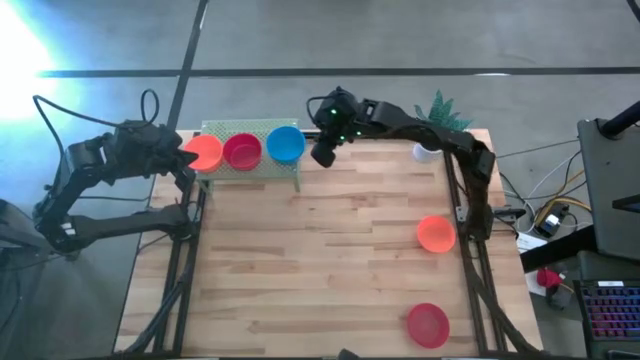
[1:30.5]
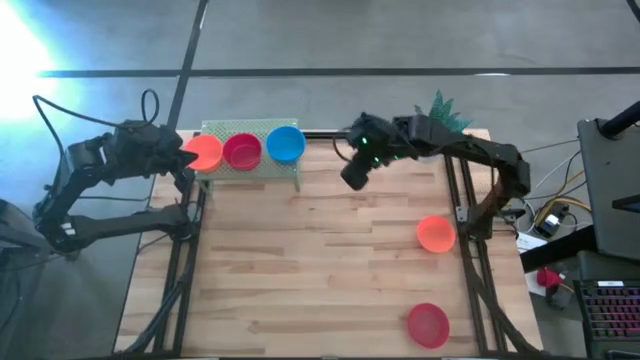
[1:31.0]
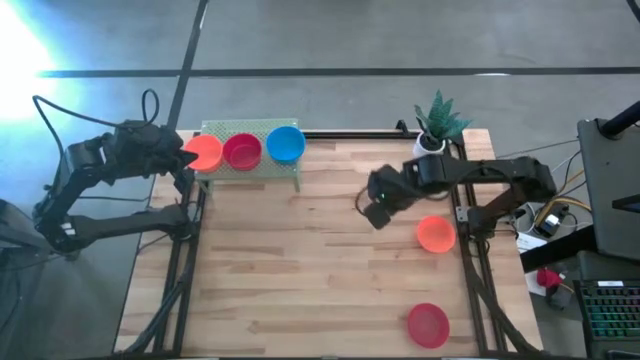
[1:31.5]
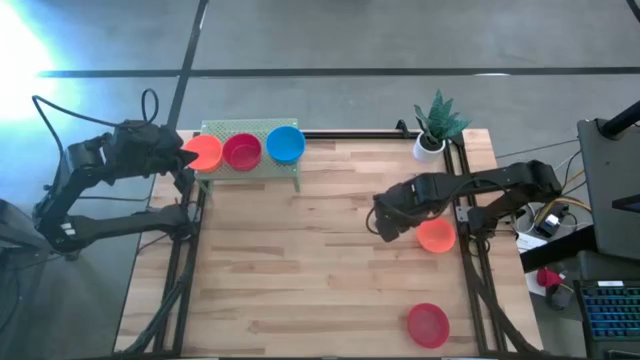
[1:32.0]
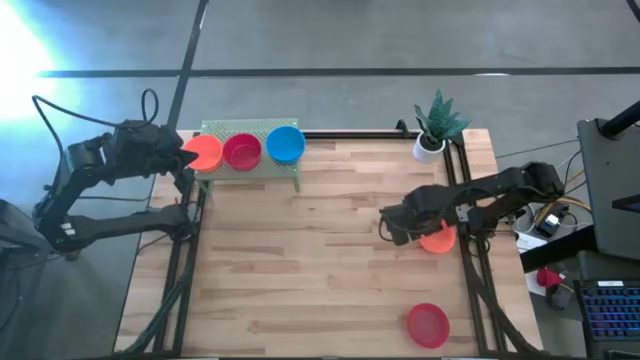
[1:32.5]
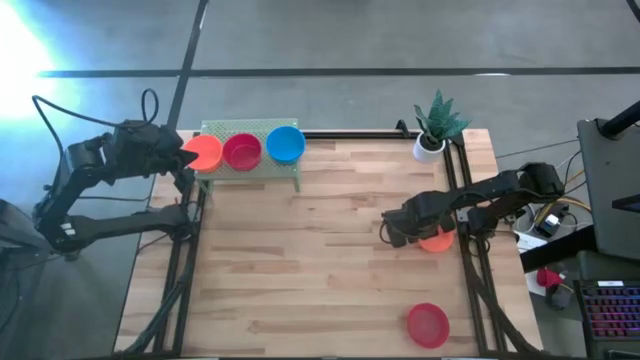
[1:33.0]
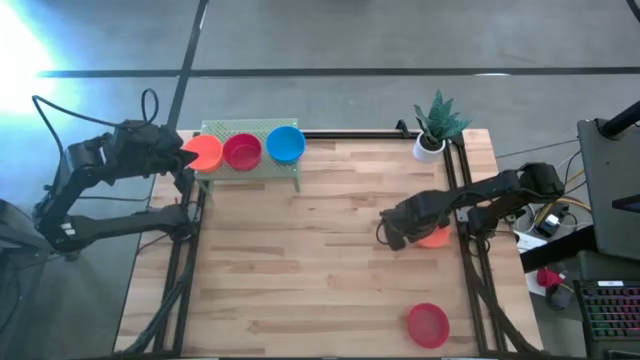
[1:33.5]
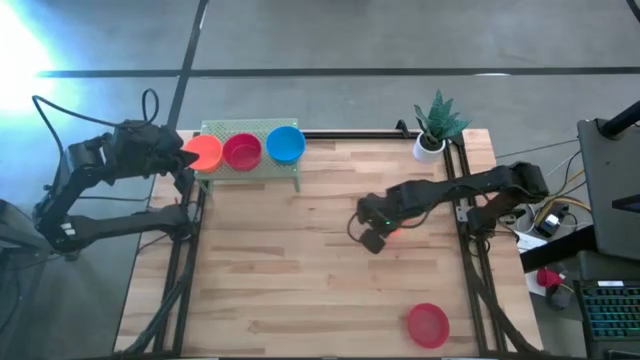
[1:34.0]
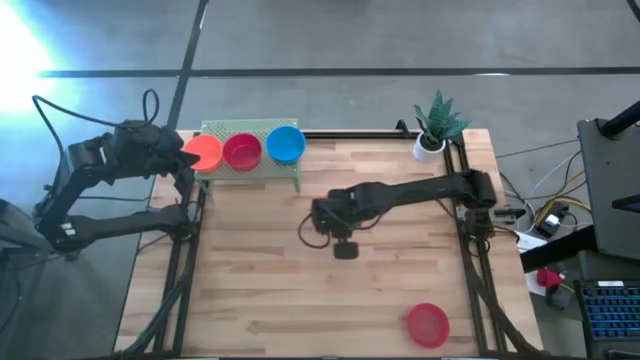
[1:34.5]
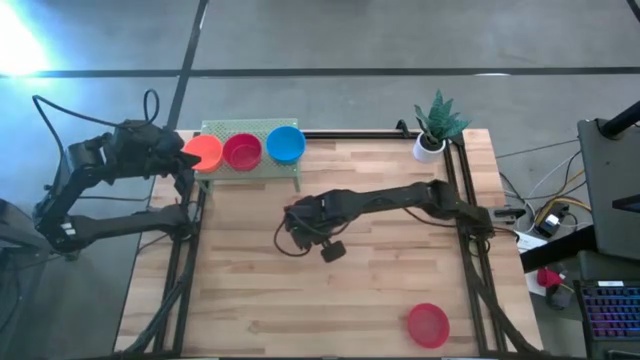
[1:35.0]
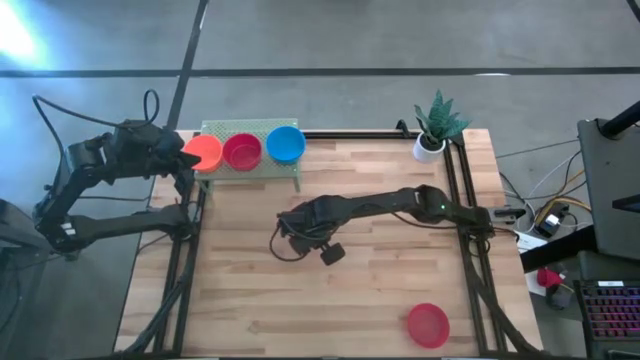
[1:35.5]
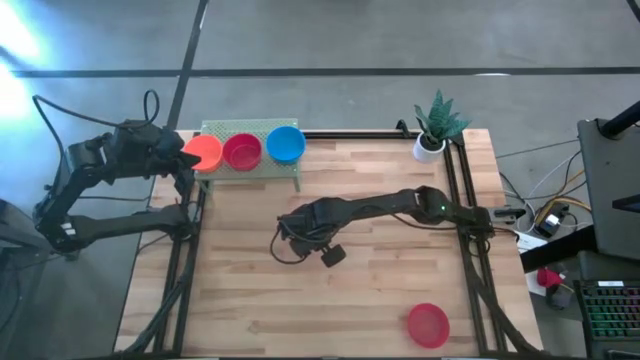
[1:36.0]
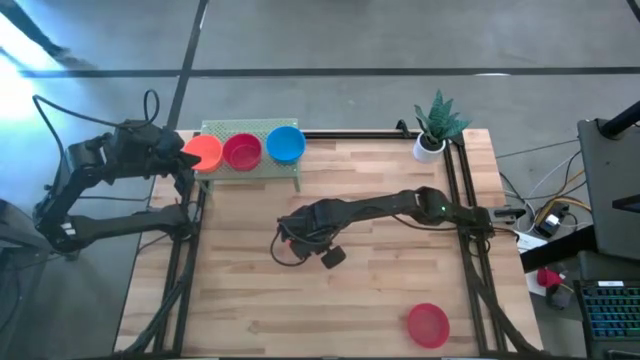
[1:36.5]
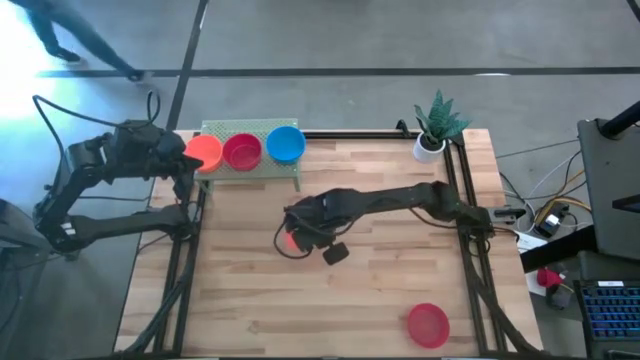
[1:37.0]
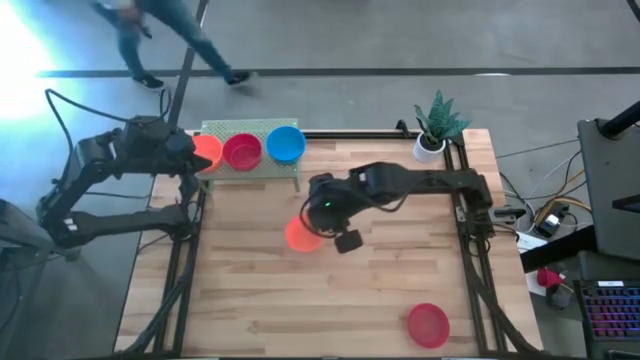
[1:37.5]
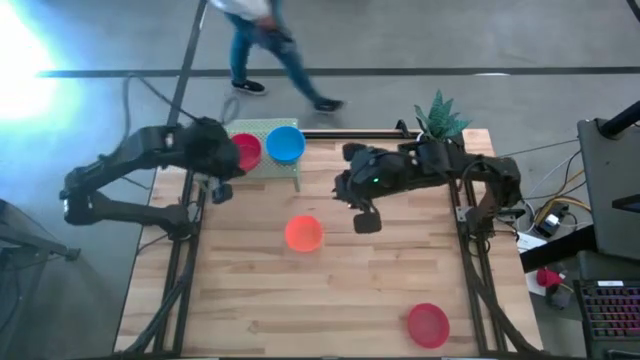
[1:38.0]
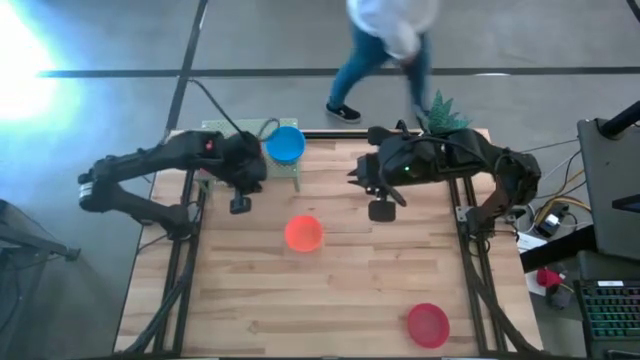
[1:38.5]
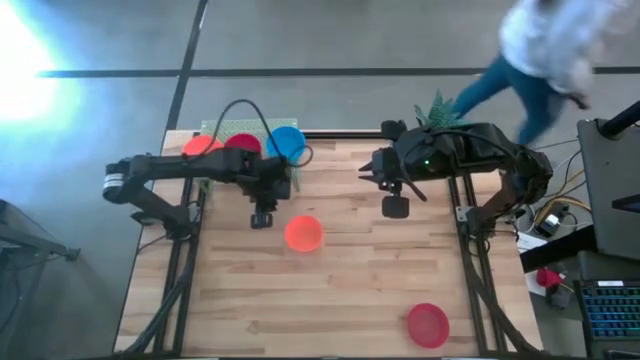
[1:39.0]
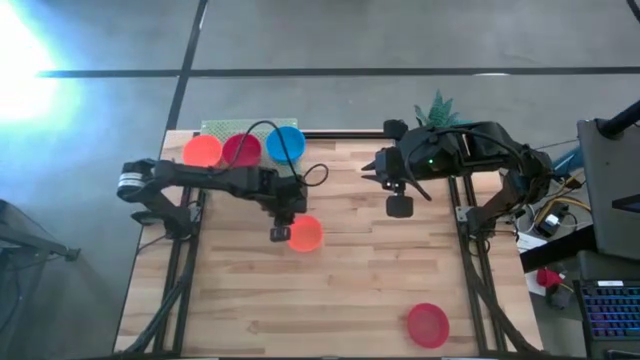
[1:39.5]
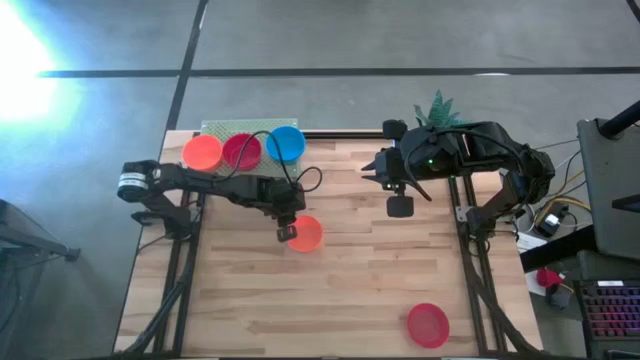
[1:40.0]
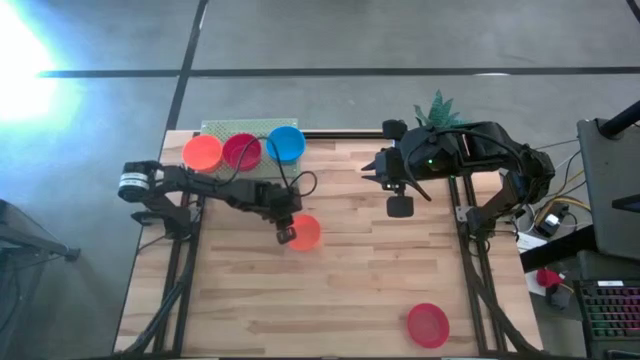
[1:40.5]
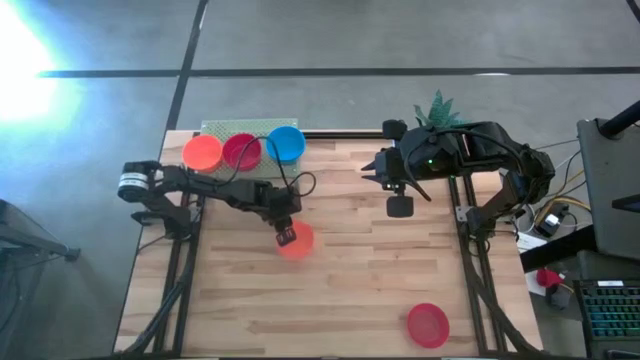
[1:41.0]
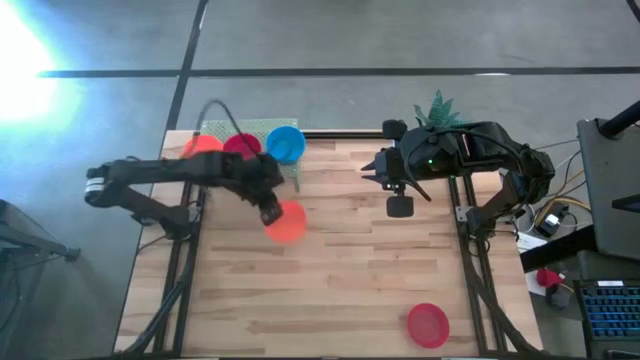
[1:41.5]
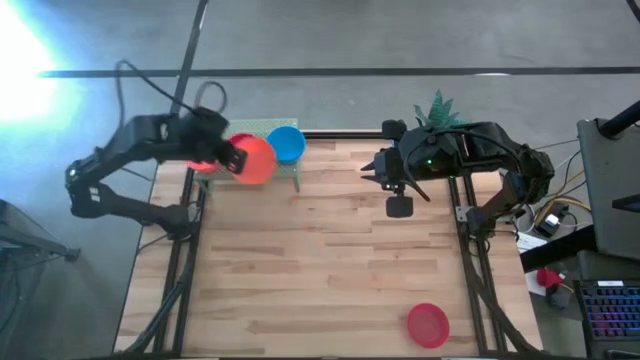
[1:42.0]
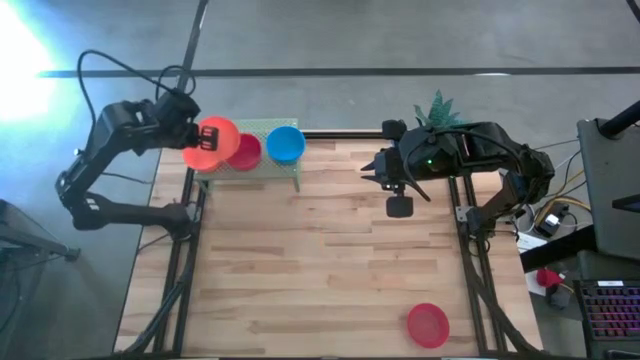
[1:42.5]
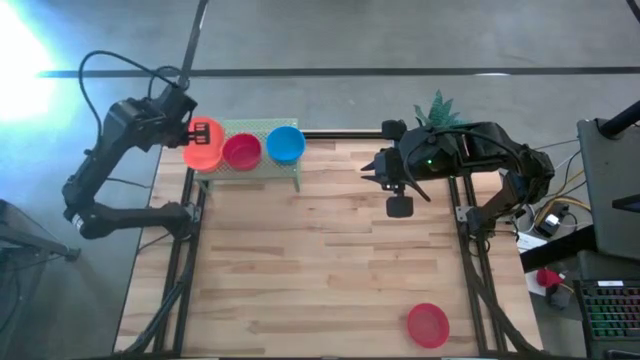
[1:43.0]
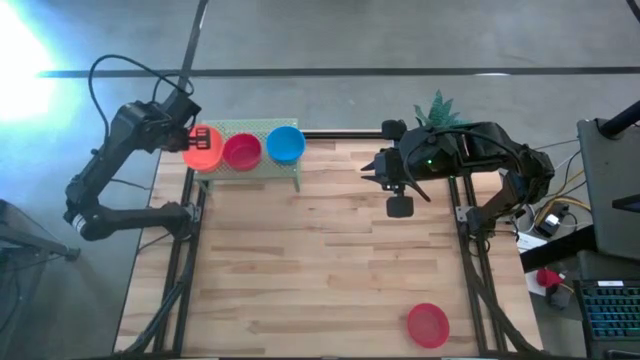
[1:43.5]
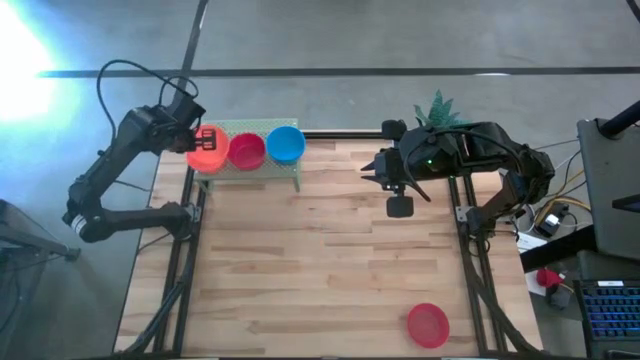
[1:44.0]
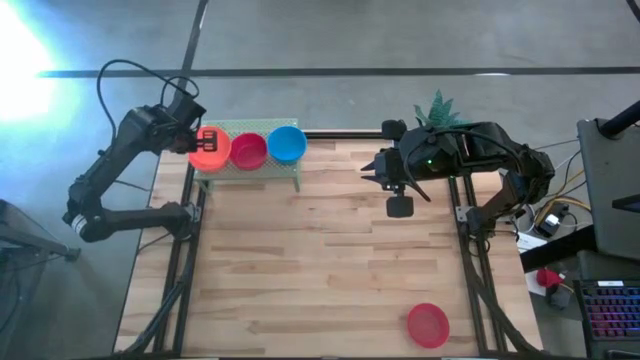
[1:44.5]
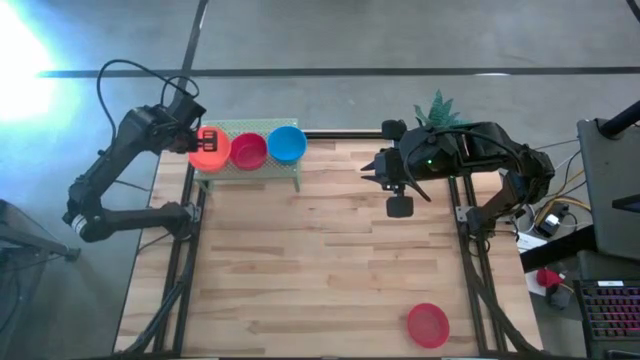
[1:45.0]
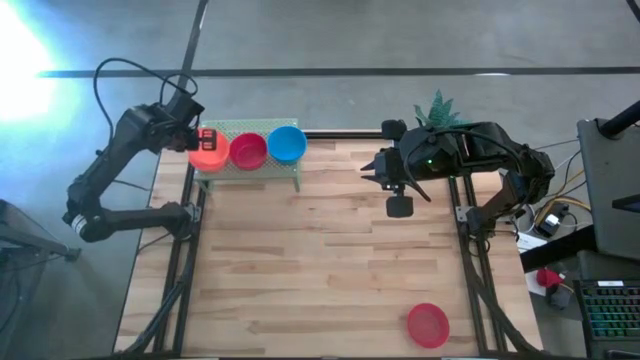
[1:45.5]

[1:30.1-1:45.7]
Task: Pick & Place Mini bowls
Stack the orange bowl on top of the other orange bowls on the shelf

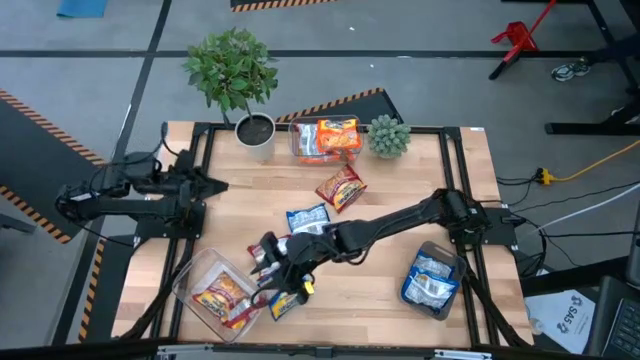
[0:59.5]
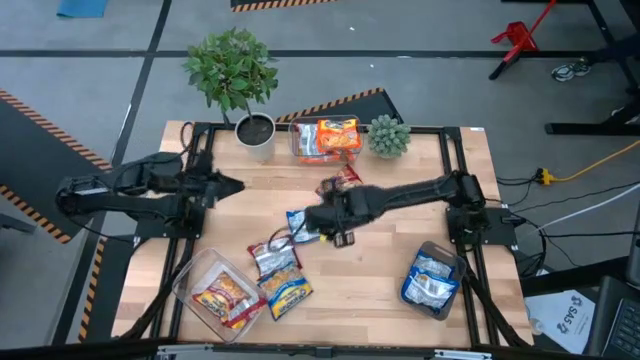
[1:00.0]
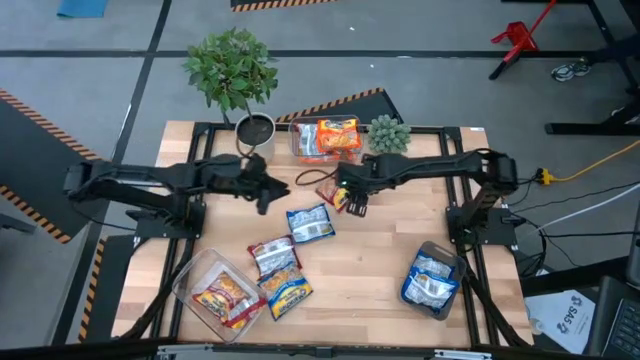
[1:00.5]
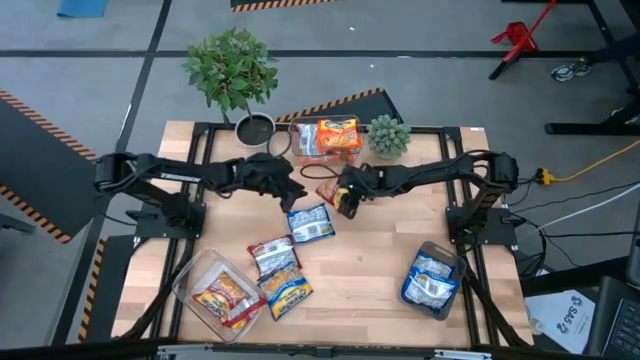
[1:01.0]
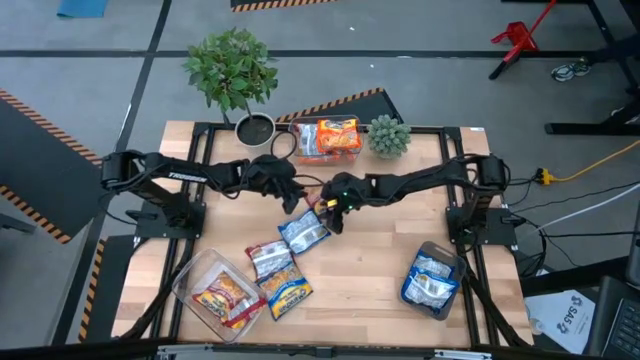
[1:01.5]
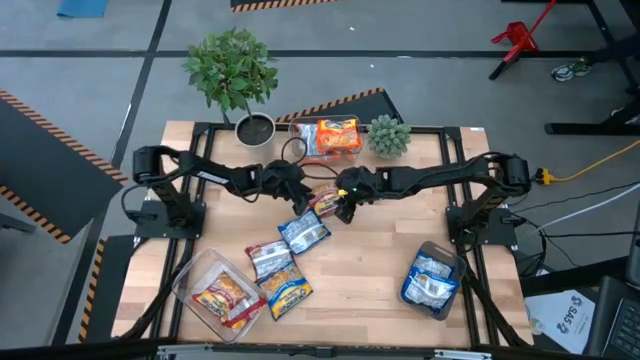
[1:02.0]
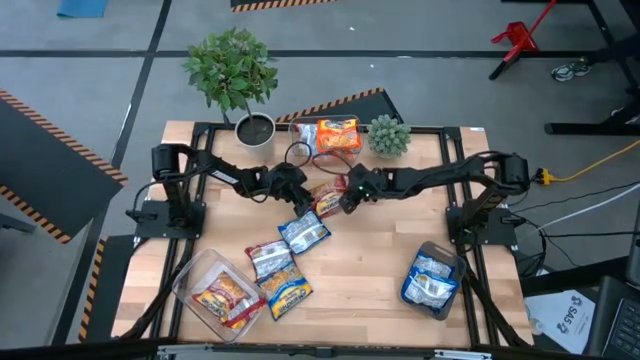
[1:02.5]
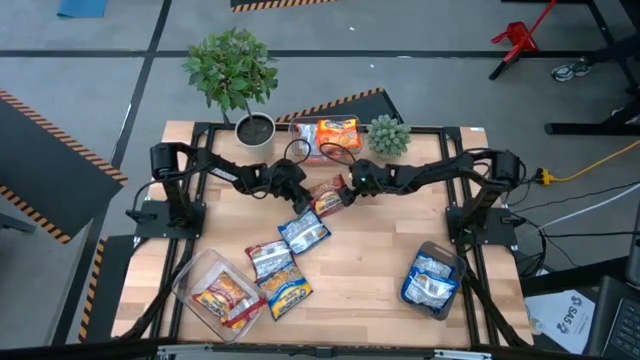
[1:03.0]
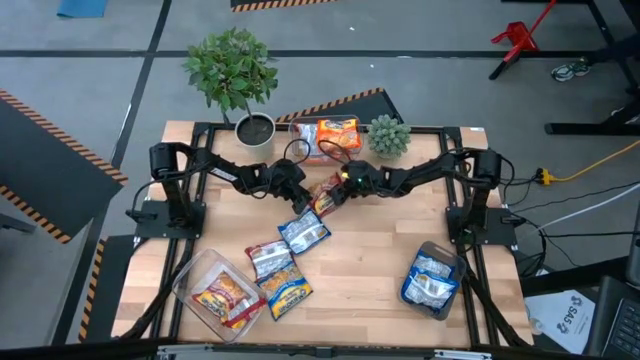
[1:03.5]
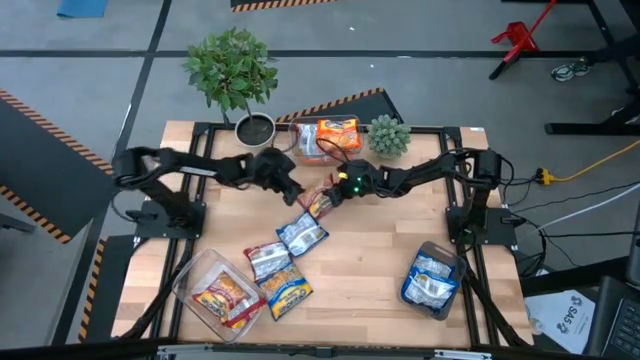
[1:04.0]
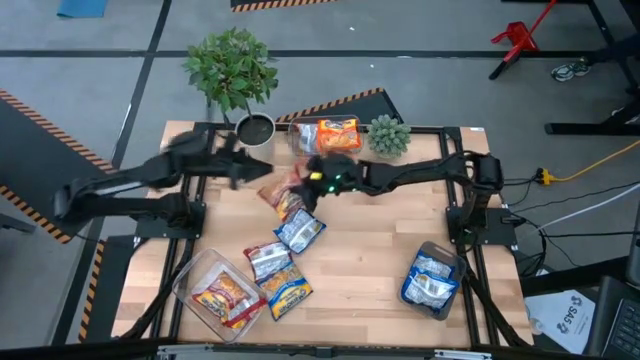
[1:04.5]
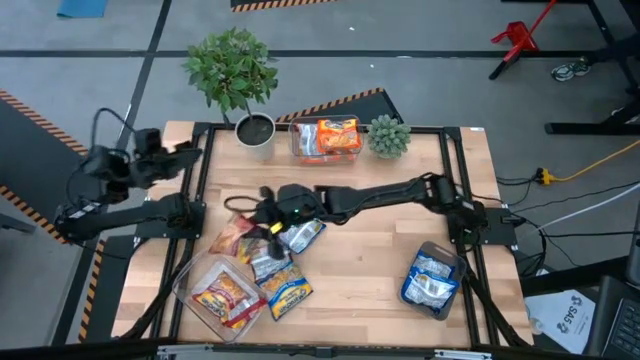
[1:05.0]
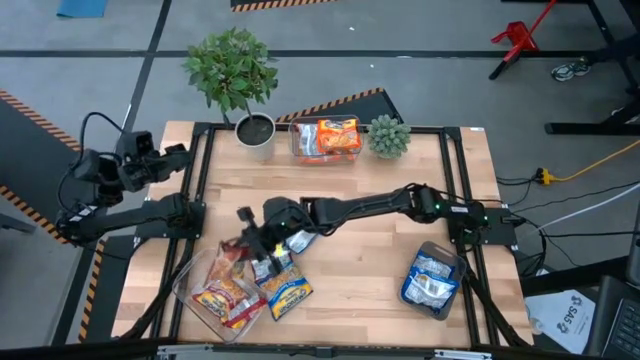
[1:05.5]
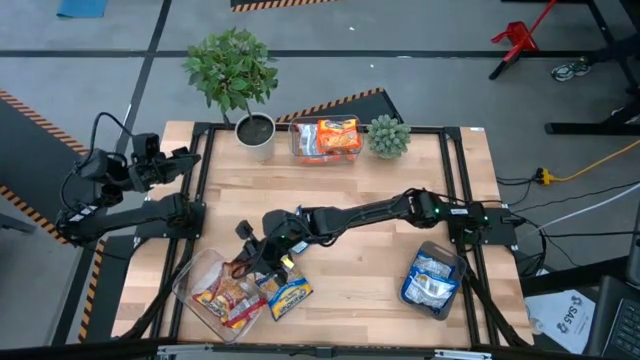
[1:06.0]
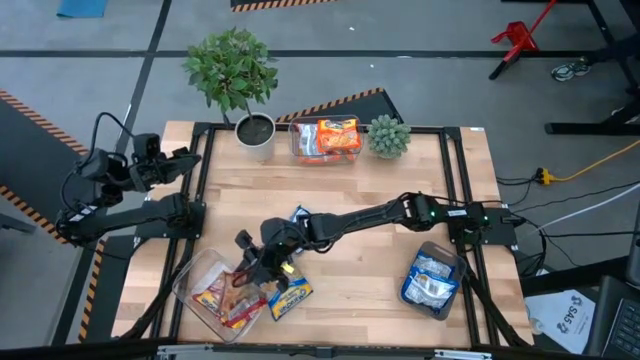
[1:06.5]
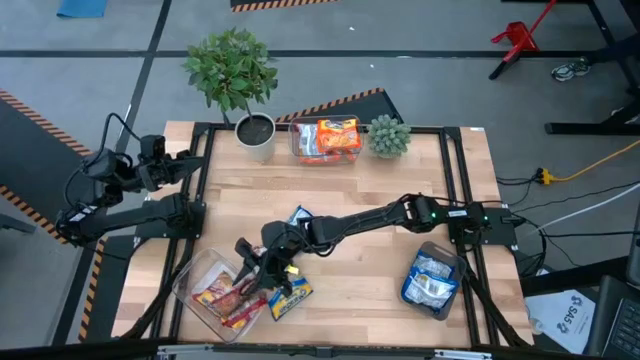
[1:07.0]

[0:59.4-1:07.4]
Task: Sort Maruchan noodles
Put the red noodle pack into the bottom transparent bin
